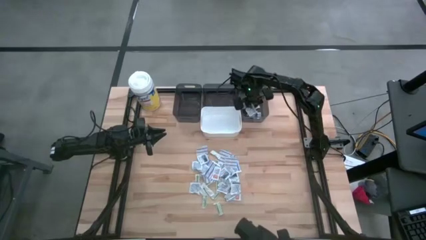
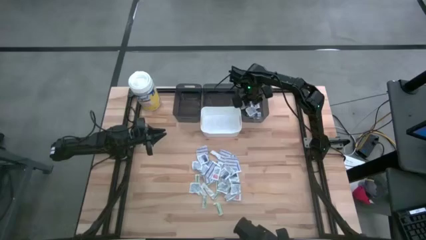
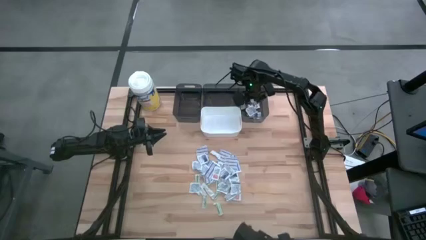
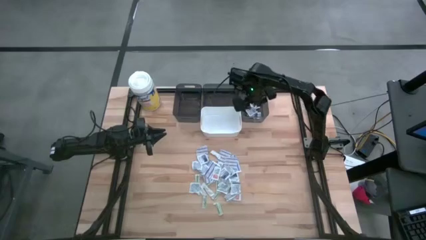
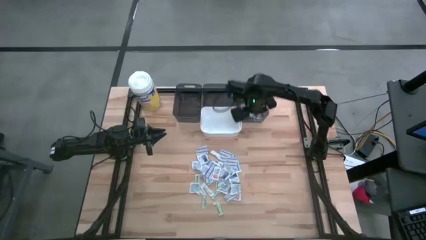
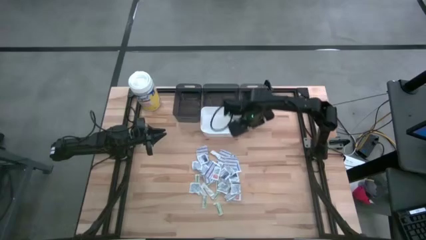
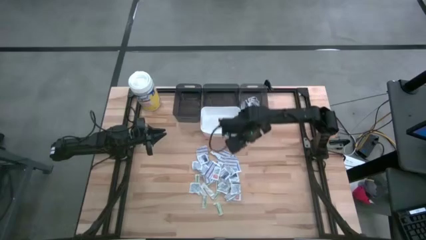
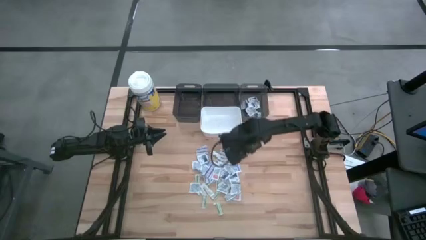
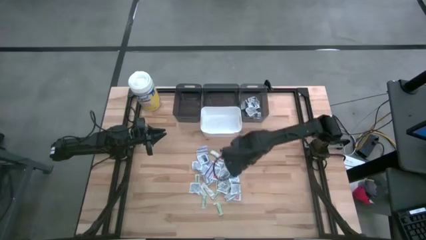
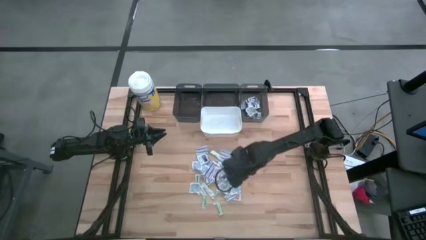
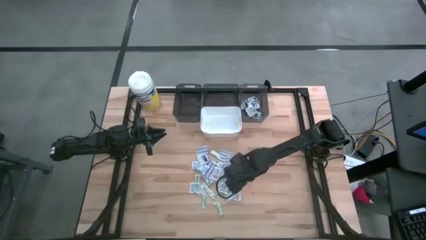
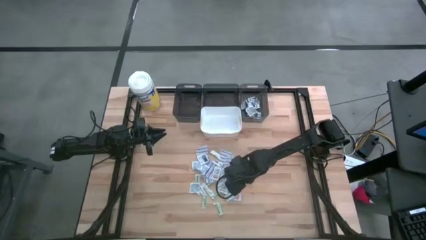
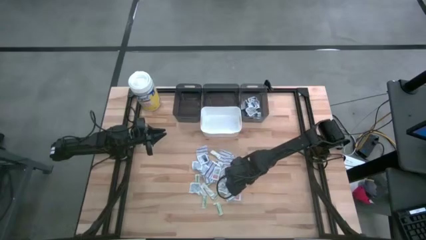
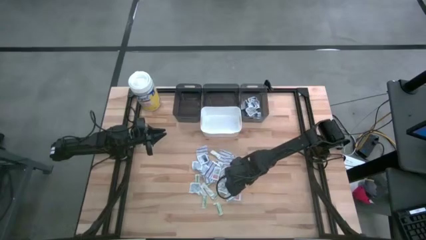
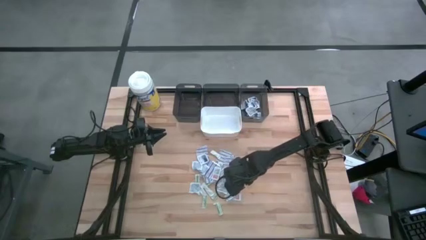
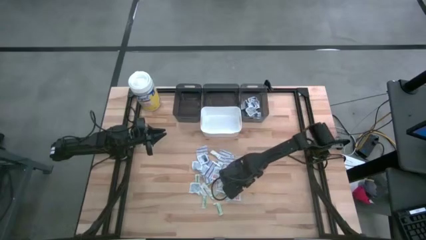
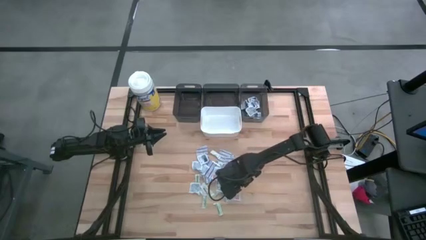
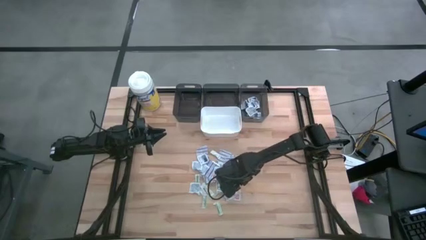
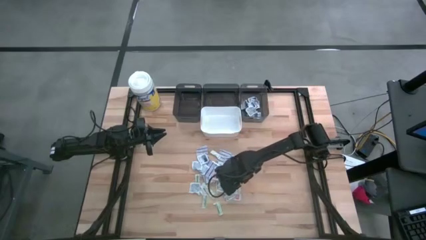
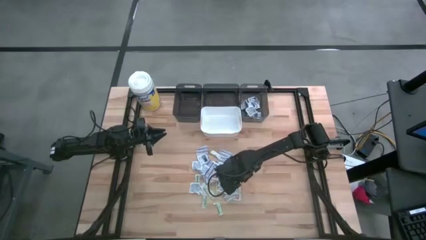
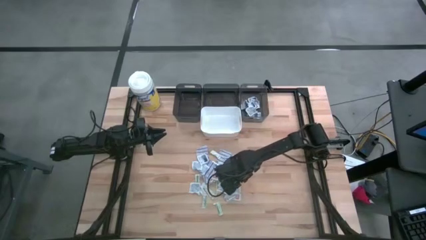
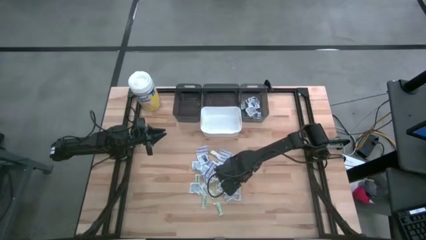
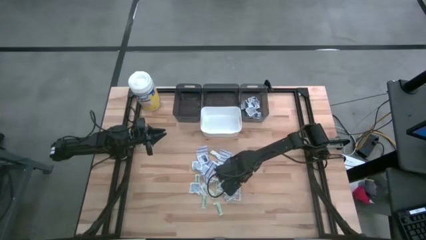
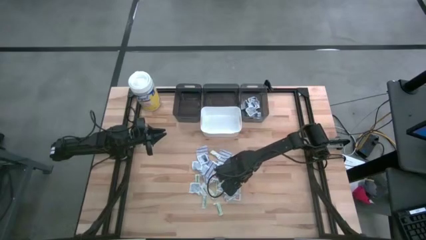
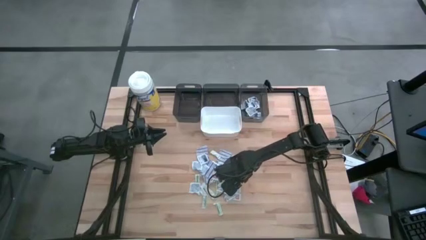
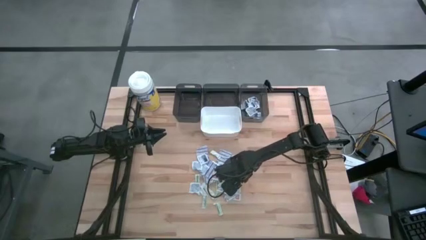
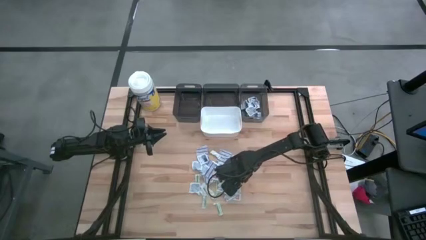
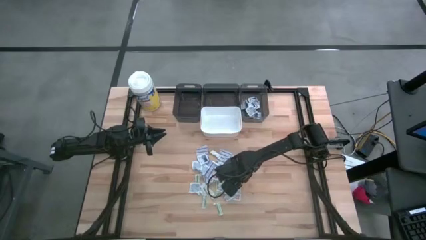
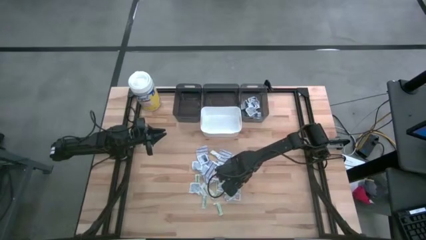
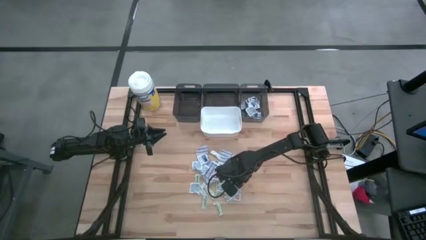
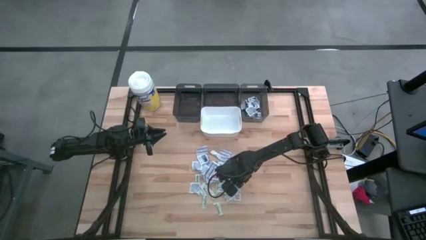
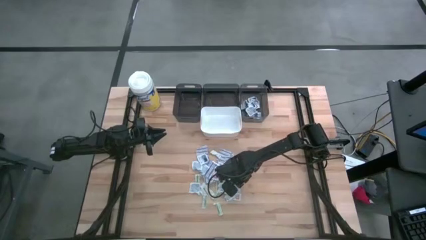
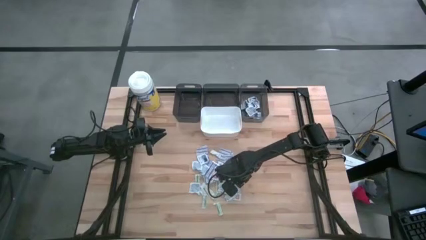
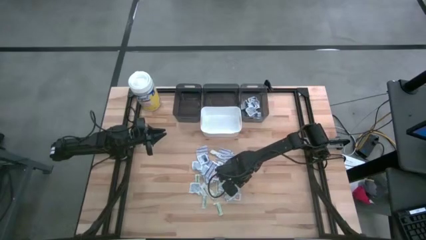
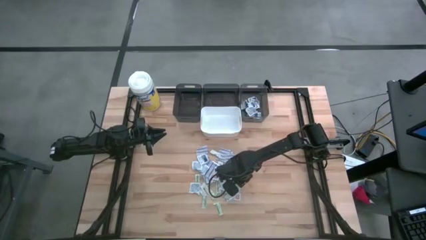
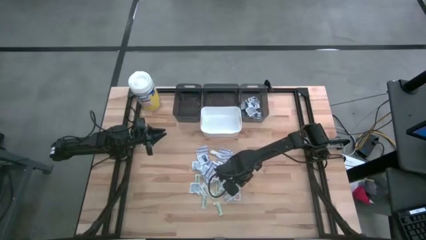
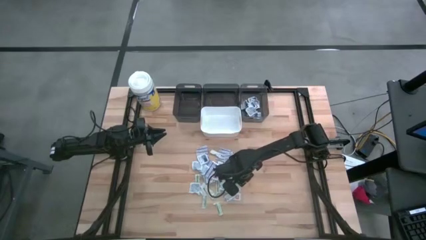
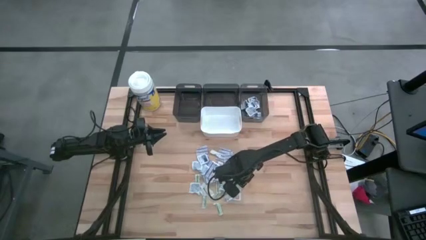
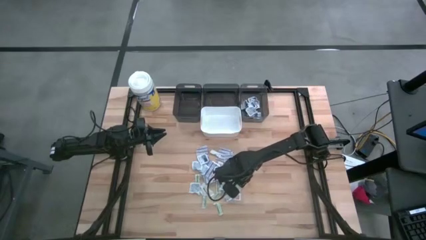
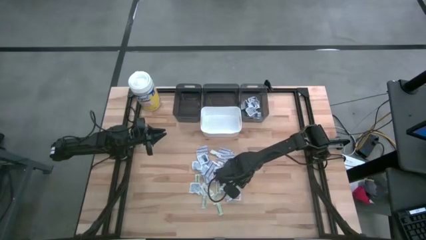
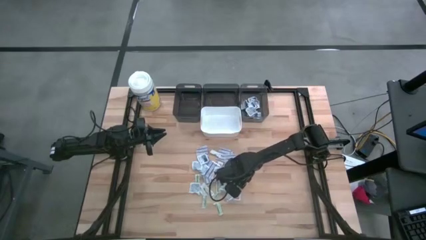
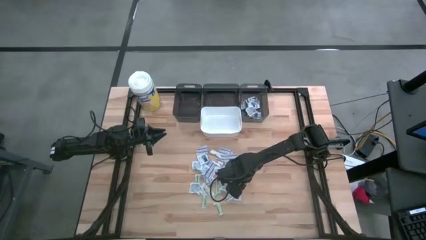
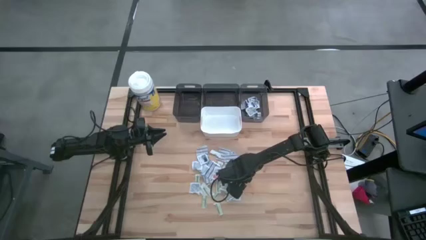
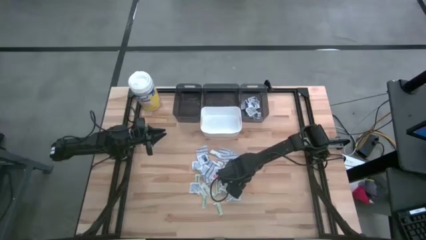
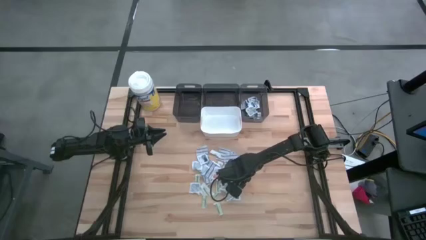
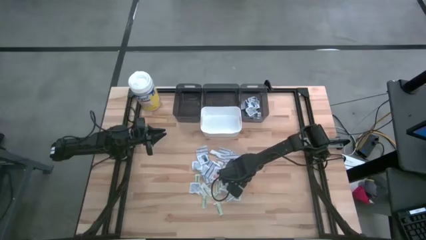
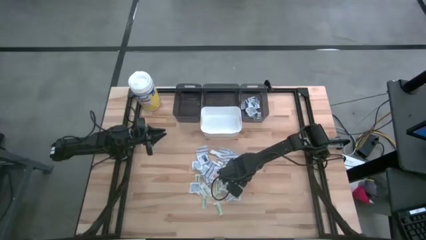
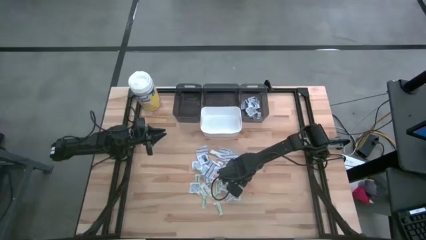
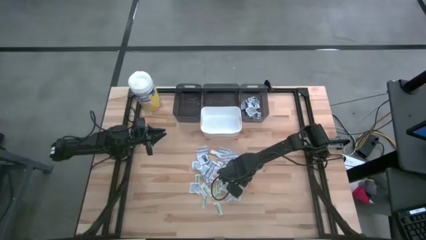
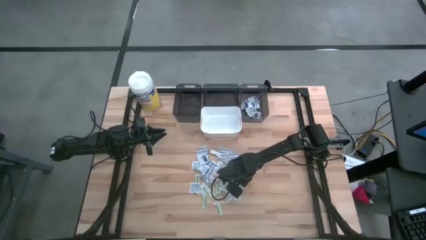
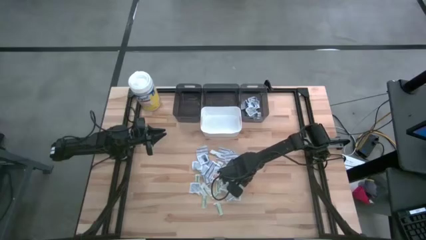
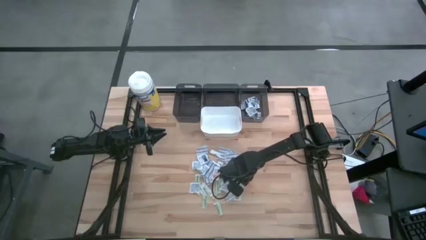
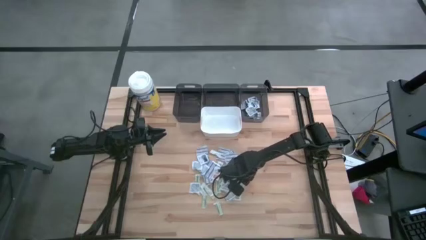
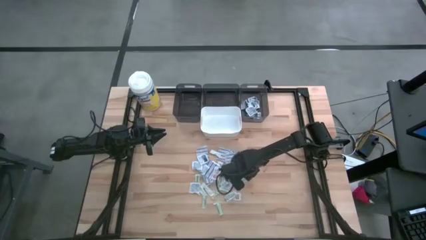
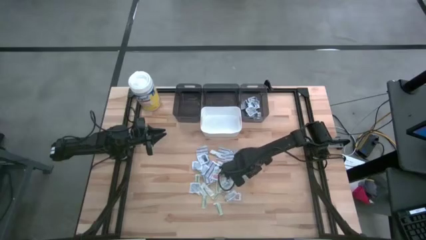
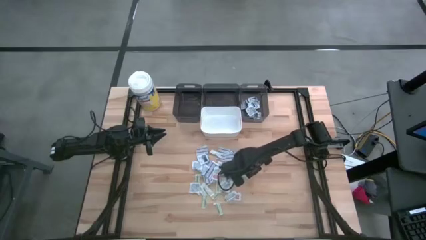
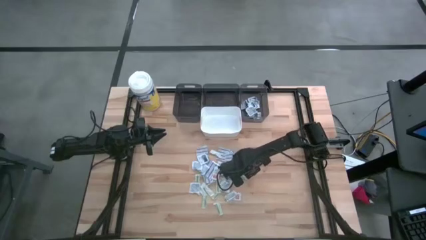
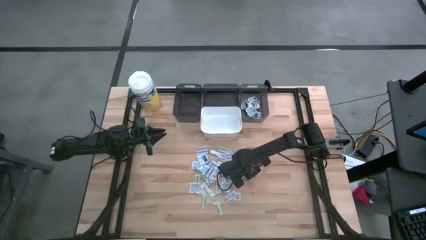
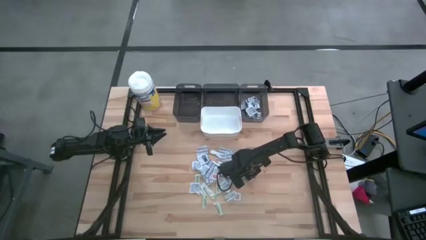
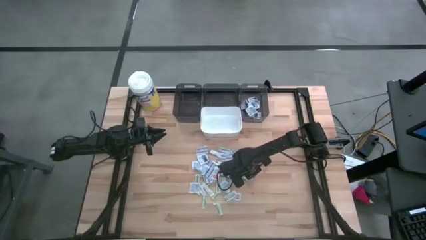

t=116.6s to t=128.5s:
Task: Pick & Place First Aid Supplies
Put the blue alcohol pad into the right black bin

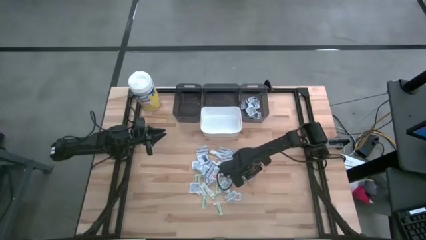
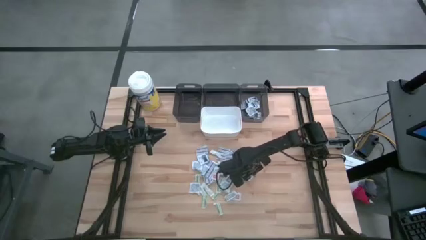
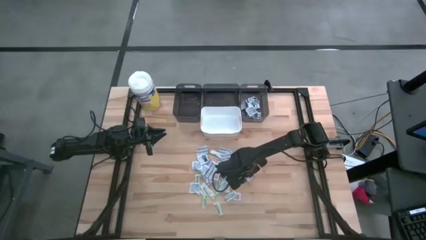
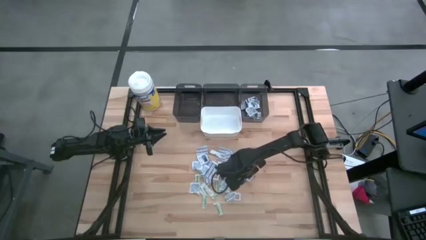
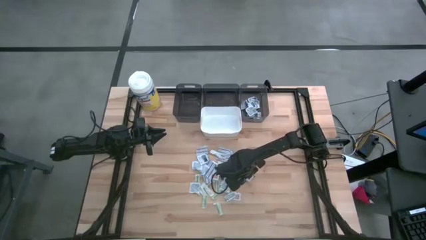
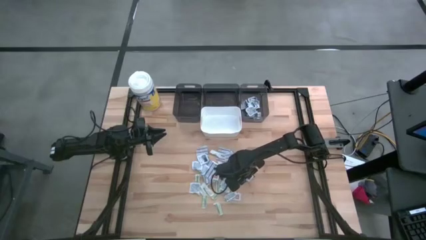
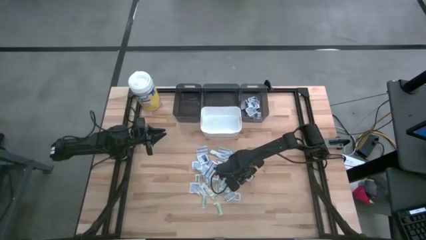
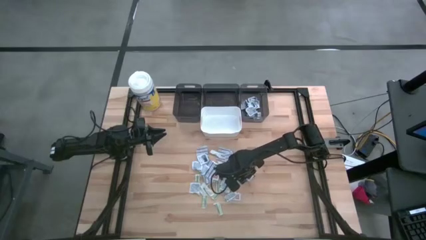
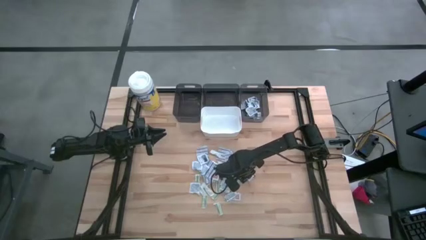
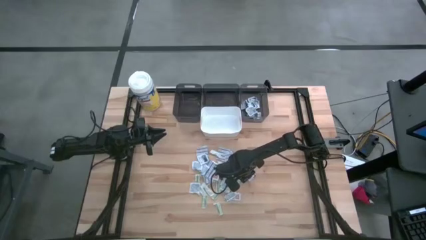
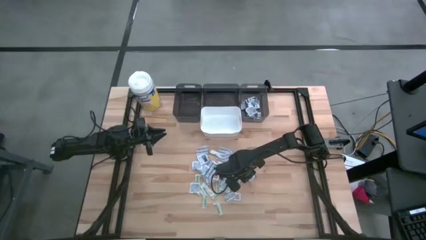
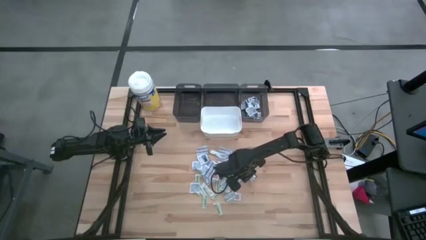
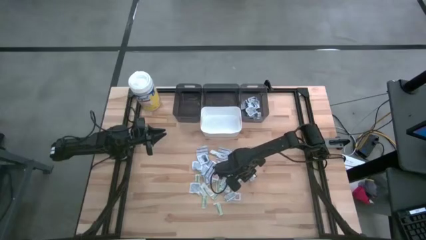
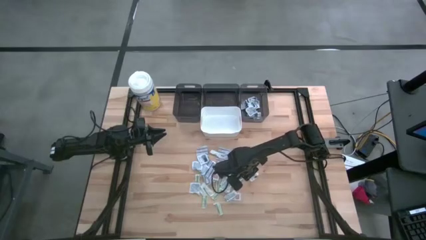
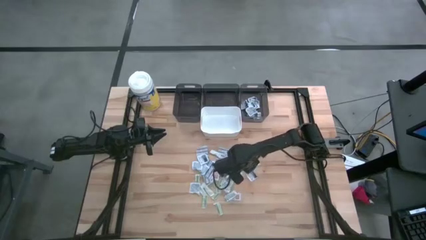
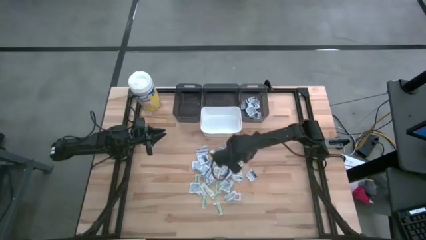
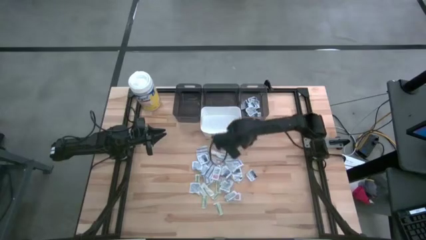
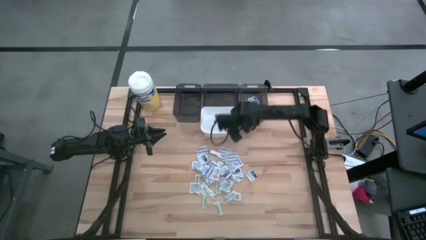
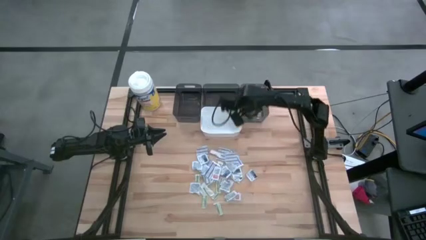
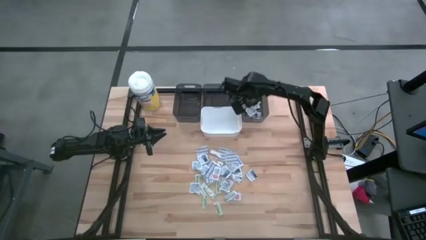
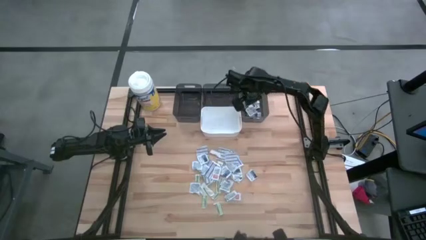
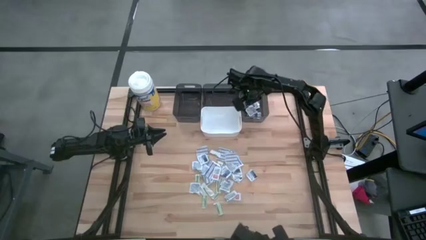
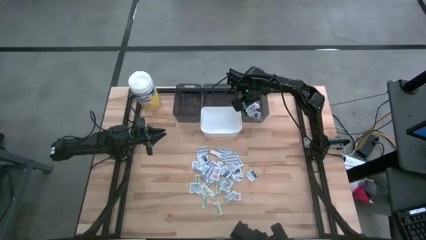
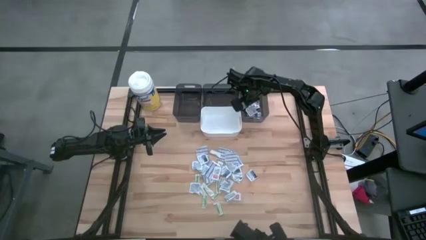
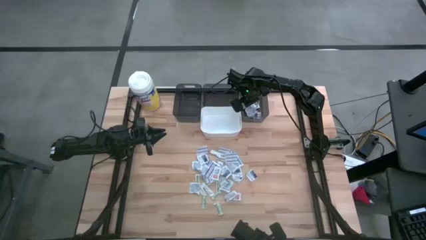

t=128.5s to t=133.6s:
Put the blue alcohol pad into the right black bin
